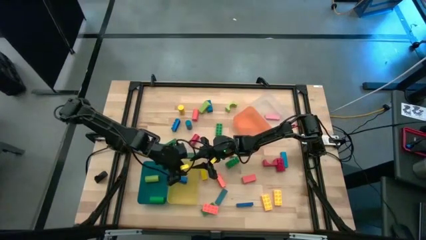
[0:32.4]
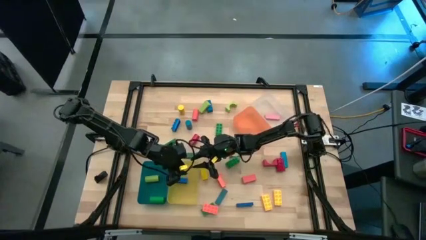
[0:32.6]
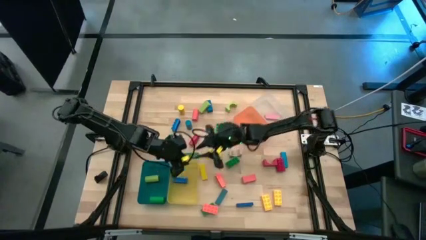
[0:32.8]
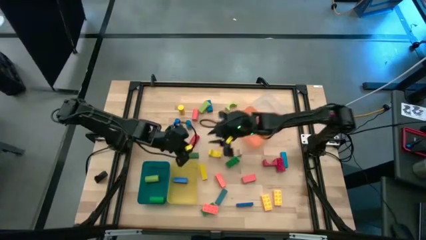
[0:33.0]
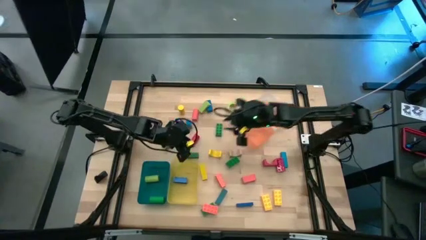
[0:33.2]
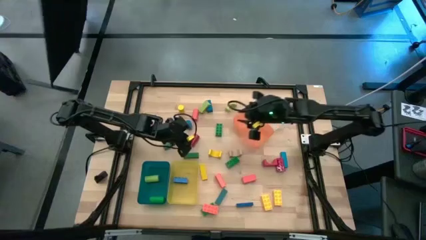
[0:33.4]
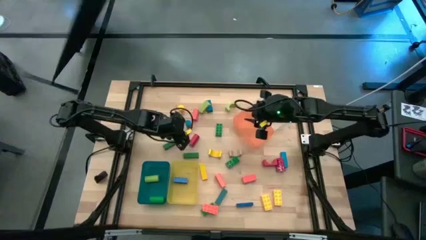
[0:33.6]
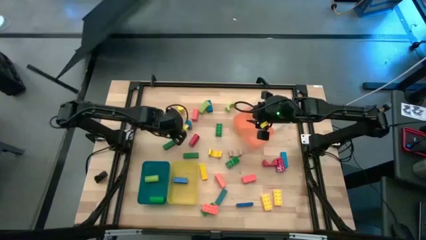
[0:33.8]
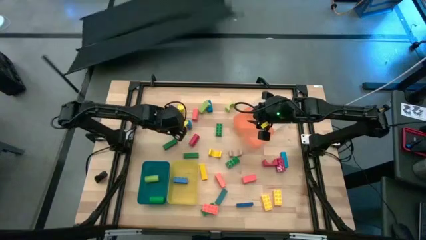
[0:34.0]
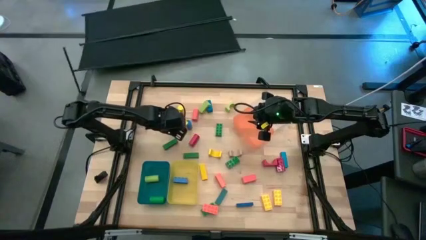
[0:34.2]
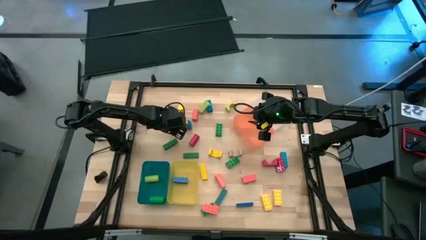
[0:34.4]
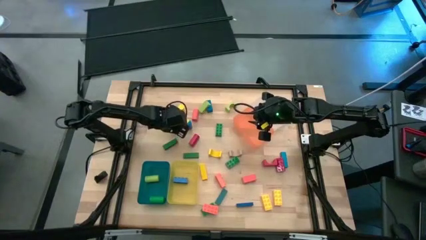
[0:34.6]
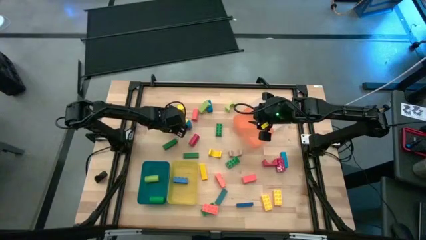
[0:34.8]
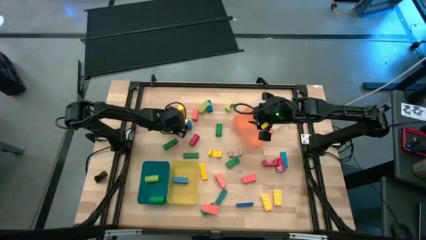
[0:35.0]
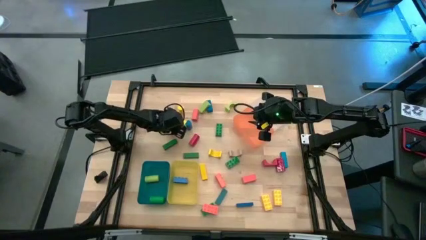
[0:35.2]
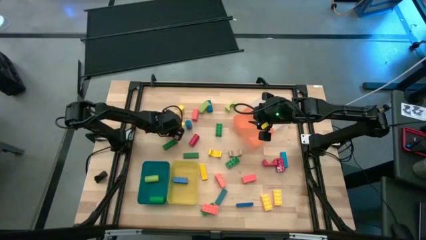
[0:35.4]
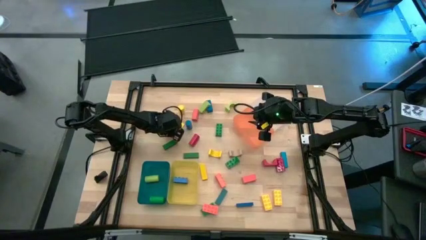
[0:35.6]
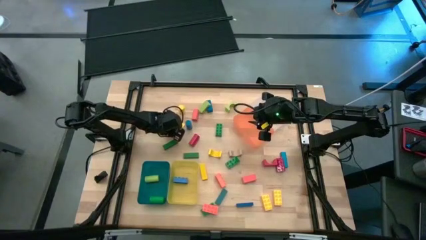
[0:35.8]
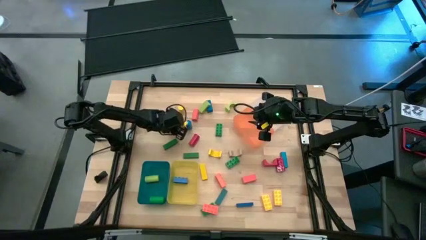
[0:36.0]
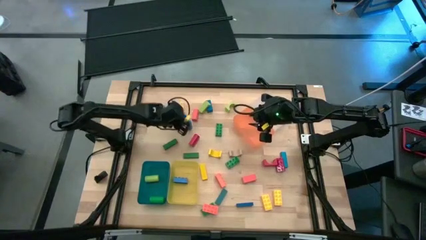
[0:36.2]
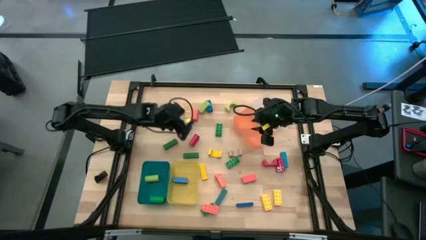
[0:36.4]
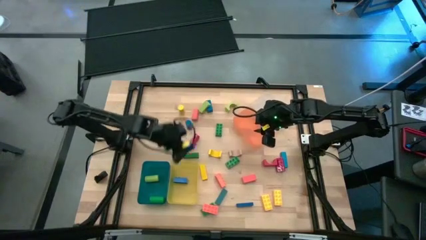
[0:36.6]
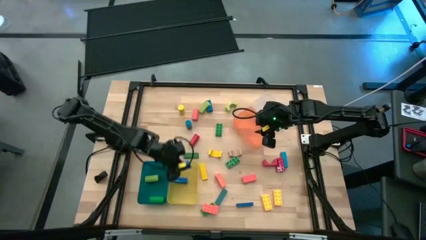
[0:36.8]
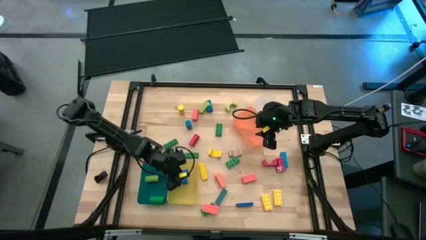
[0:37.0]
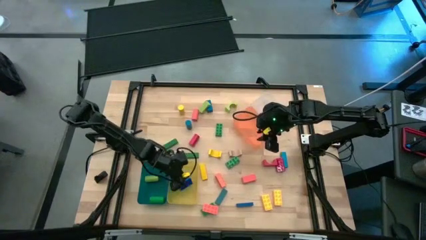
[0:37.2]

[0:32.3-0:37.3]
Task: Sort blocks by size
Put the blue rectangle game piece into the yellow bin

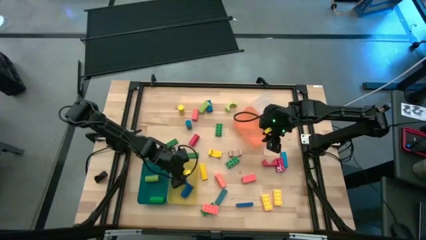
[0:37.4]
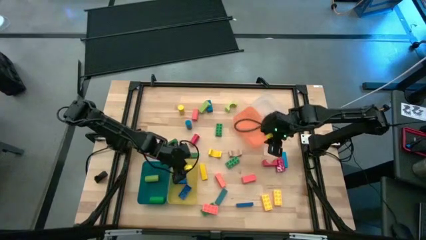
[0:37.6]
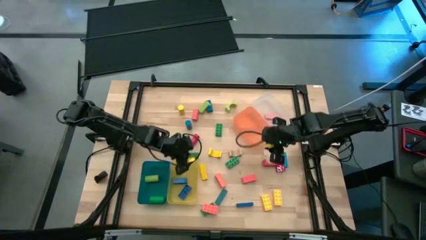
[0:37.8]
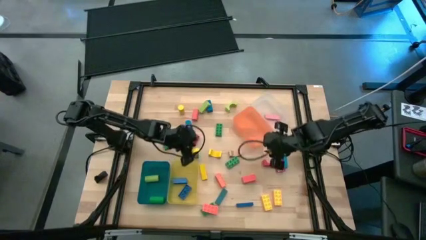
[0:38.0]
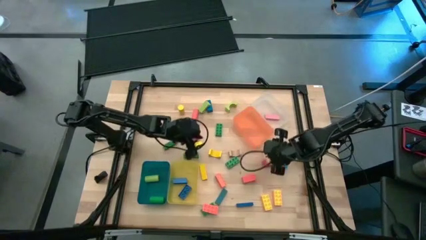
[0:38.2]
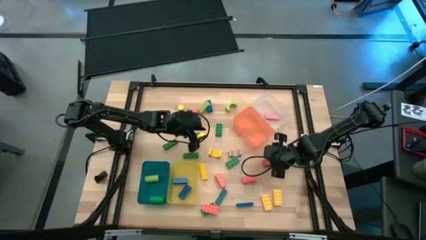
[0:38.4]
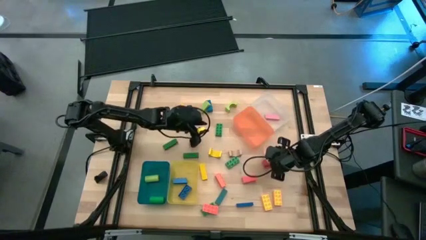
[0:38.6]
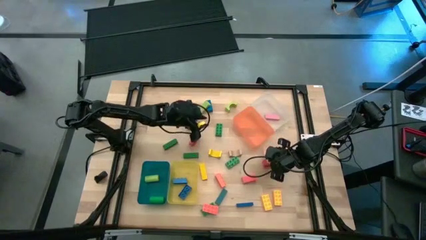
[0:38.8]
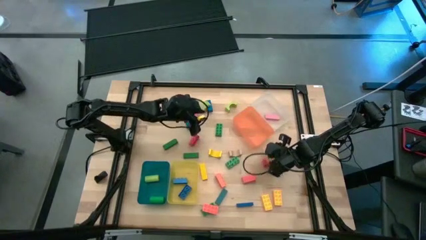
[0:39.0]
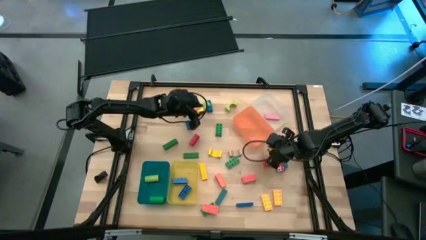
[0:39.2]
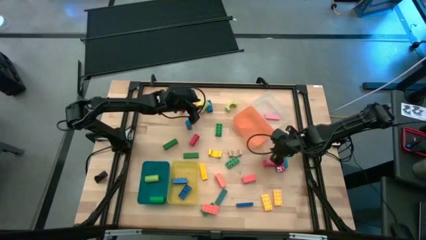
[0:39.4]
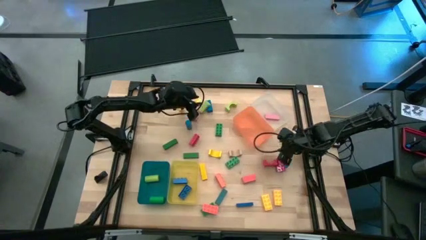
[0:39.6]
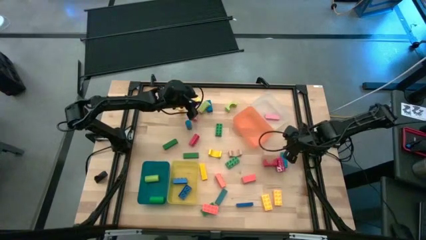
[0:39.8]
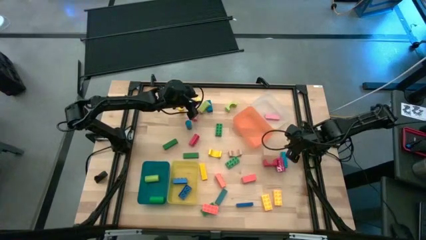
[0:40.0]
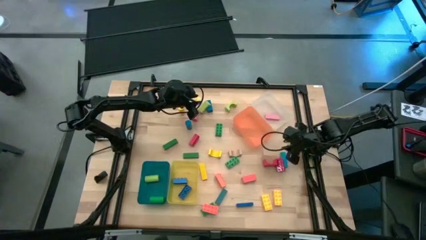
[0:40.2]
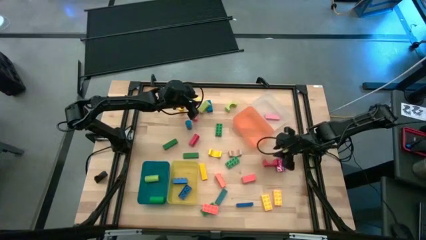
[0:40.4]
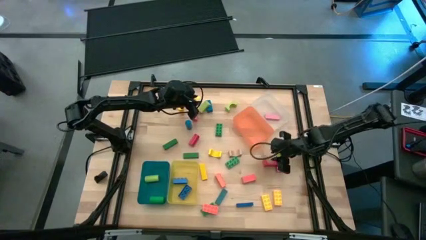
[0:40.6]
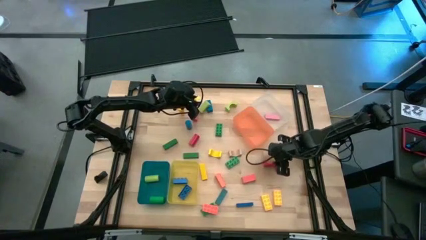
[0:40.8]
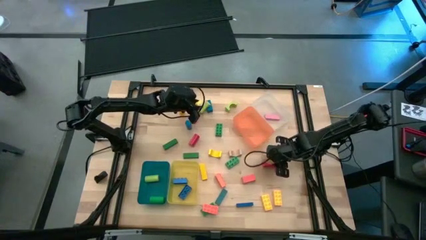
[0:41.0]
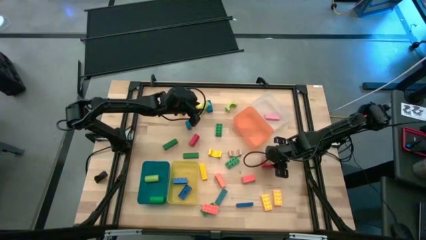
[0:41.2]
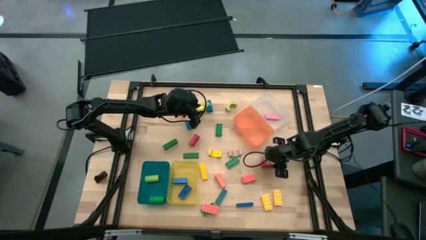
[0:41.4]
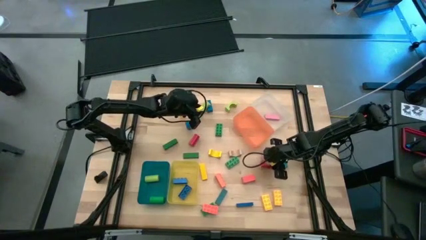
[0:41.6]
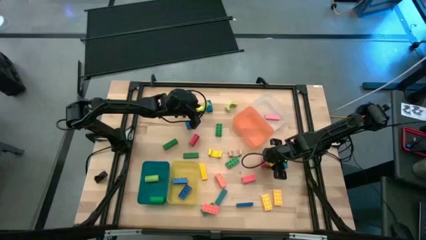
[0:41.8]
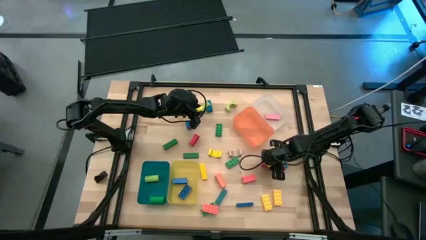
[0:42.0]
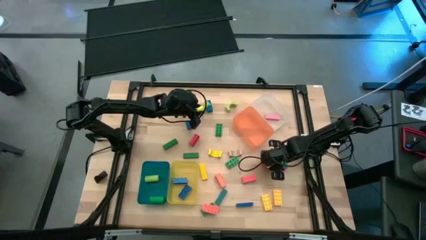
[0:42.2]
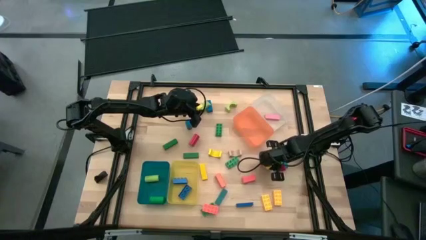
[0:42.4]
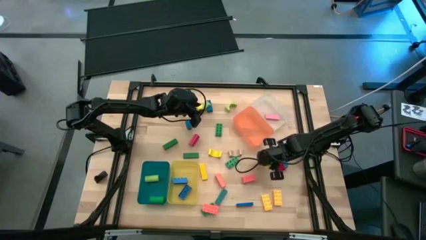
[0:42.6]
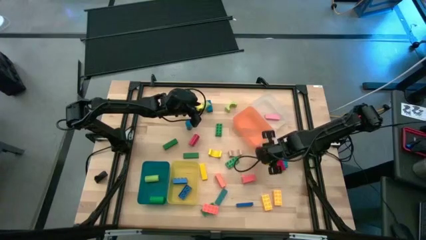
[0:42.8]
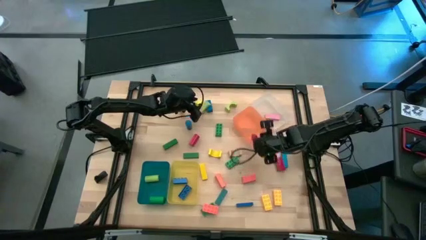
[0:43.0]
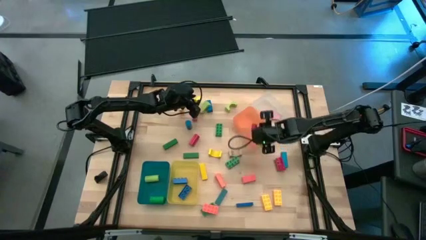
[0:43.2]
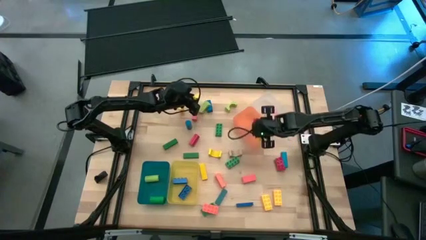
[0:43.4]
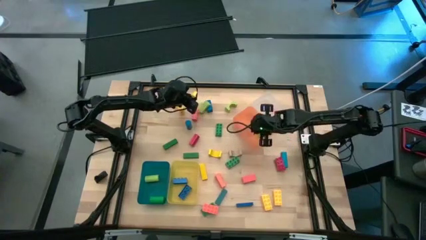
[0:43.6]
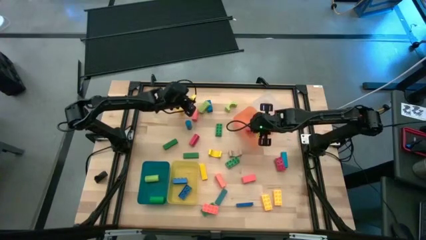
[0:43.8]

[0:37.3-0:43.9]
Put the red arch block into the orange bin

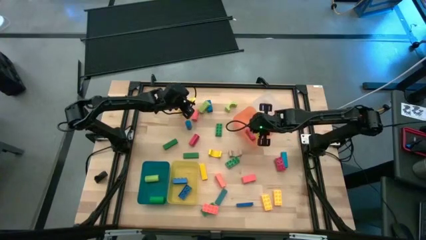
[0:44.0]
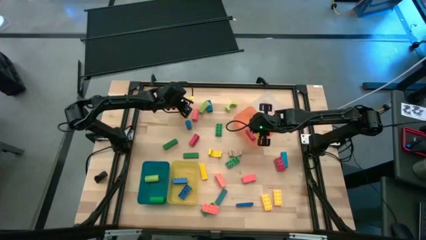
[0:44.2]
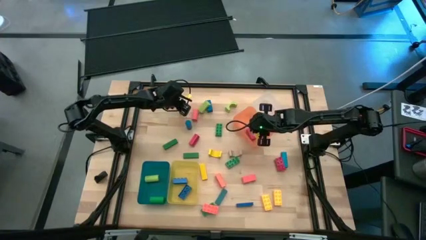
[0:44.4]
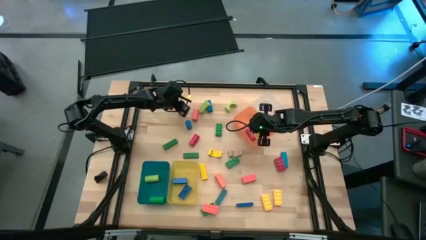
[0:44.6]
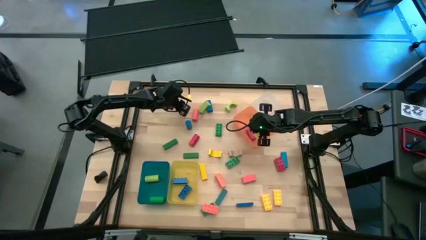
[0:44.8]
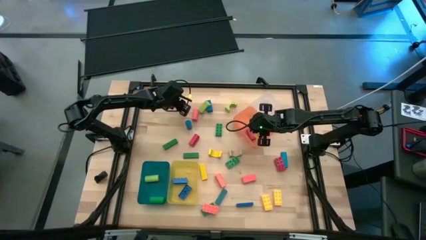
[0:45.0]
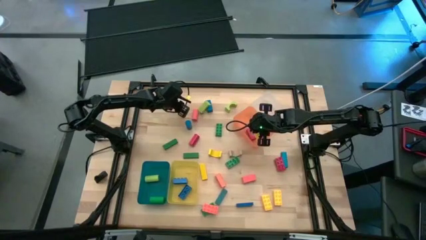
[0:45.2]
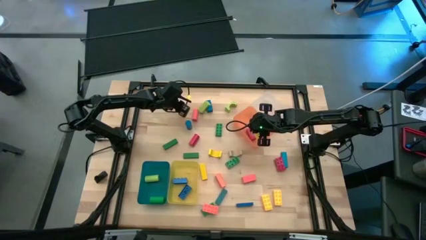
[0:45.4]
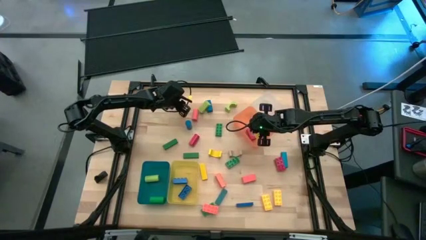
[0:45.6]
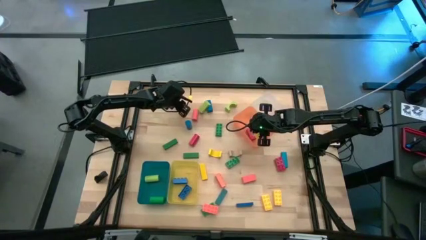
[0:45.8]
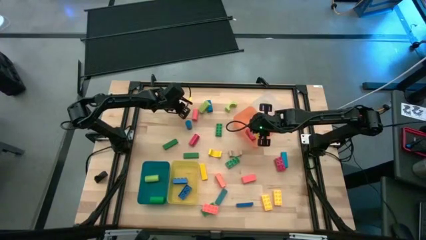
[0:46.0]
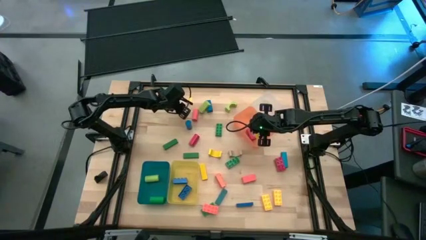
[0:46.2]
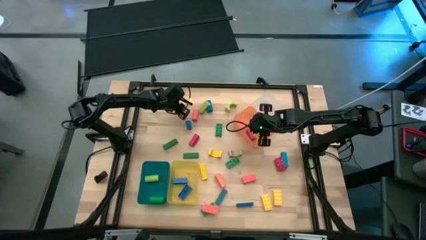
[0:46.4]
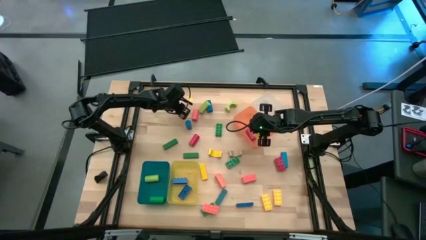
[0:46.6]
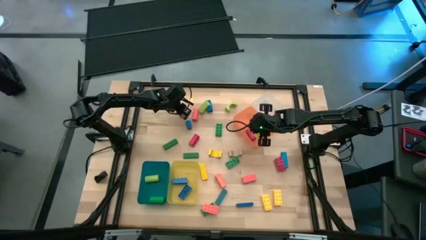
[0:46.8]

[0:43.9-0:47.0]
Put the yellow cylinder block into the blue bin

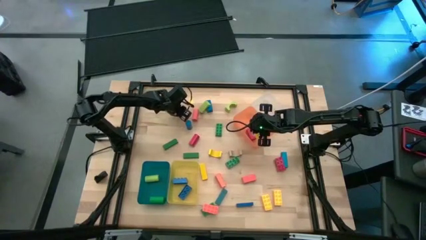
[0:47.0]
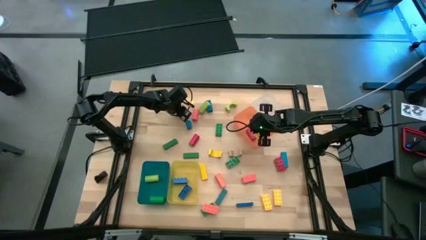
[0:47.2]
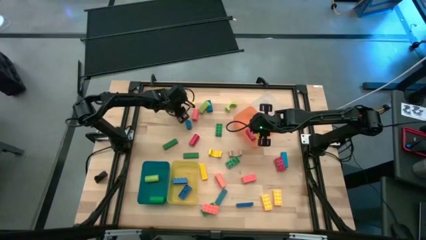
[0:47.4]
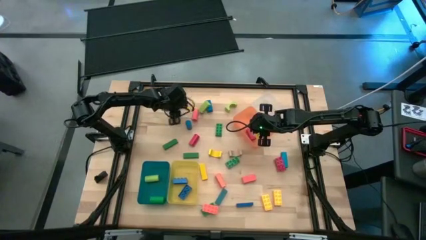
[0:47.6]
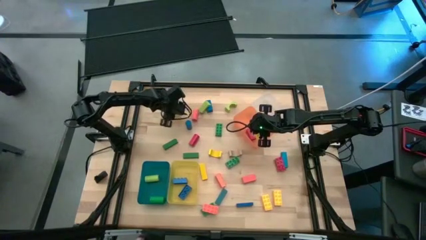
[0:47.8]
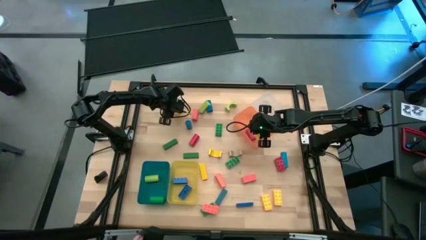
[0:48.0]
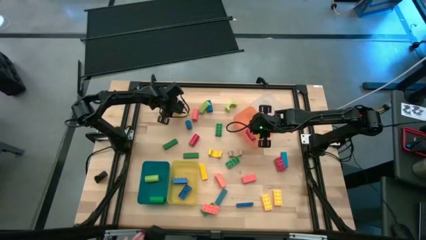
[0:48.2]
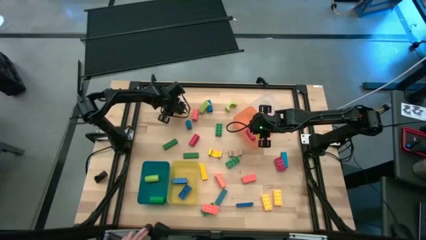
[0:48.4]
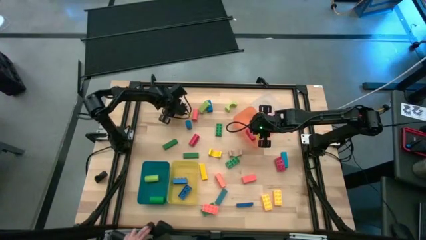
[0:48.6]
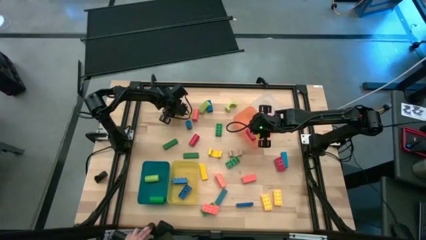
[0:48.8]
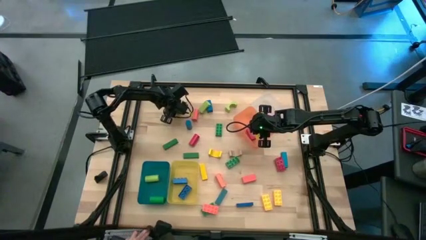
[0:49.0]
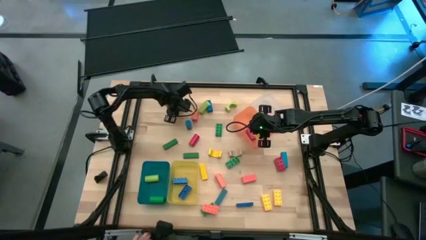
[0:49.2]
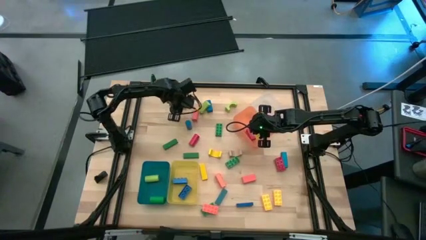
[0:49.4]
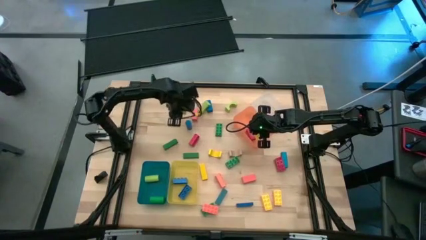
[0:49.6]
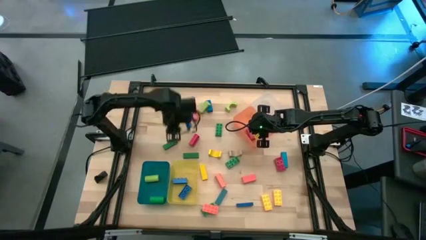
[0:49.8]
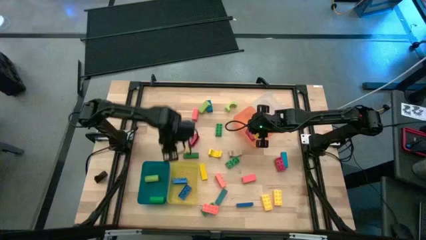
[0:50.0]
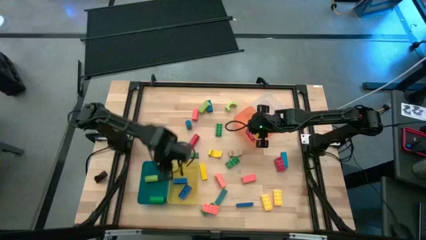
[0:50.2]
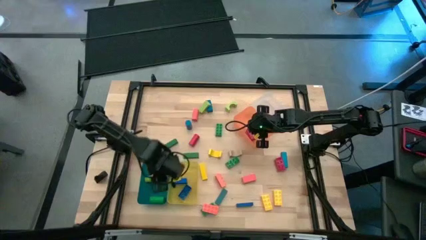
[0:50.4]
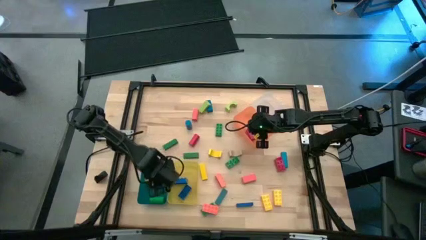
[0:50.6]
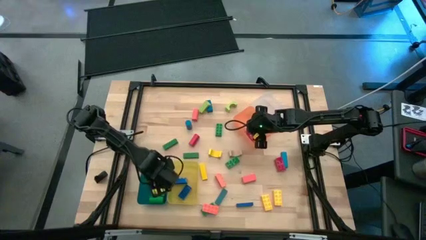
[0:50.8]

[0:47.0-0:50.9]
Put the yellow cylinder block into the blue bin
